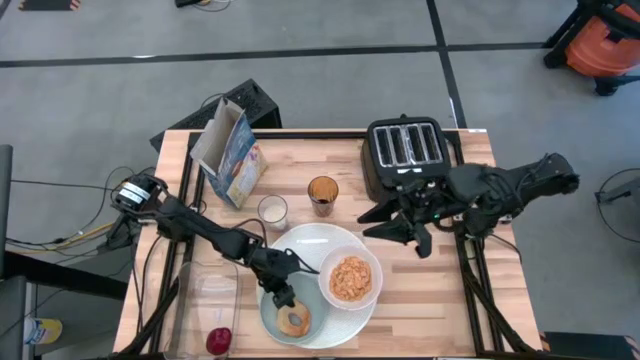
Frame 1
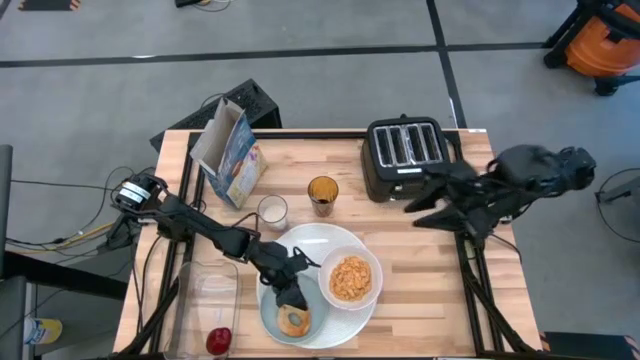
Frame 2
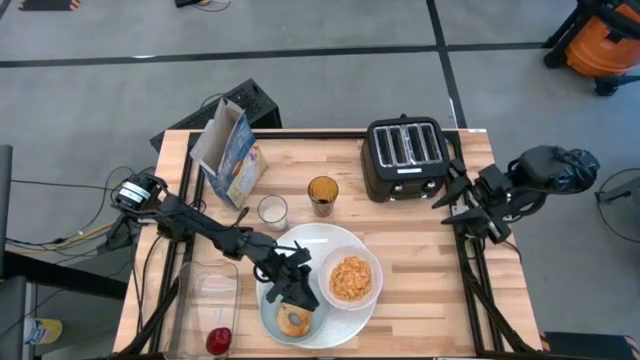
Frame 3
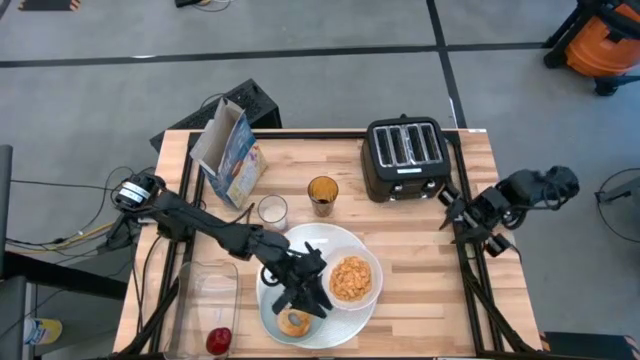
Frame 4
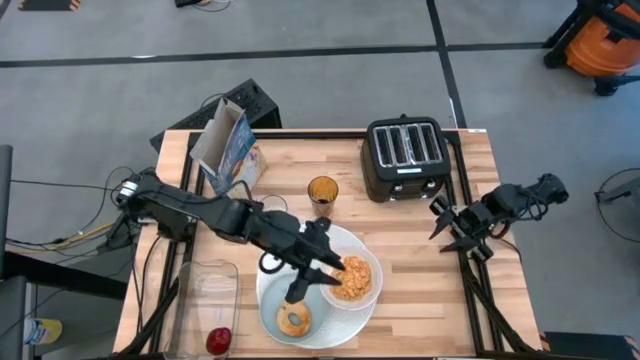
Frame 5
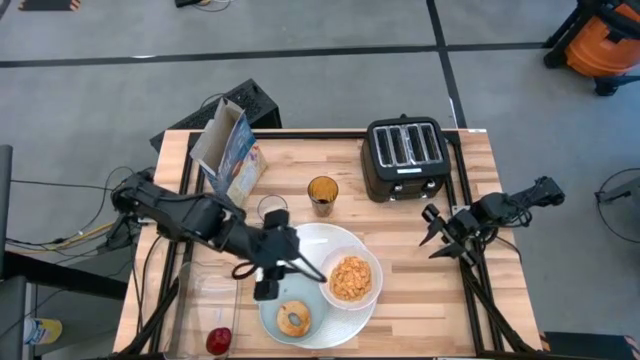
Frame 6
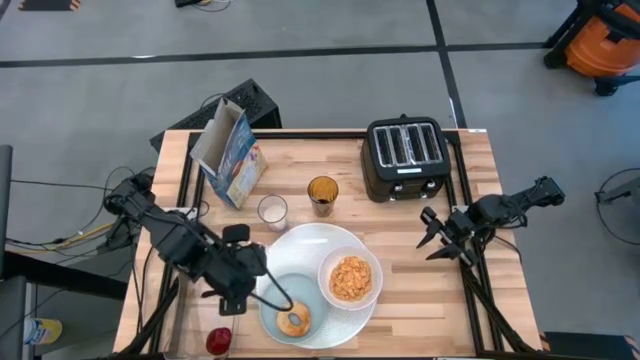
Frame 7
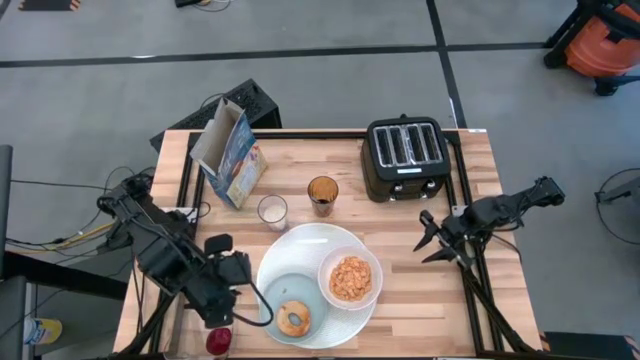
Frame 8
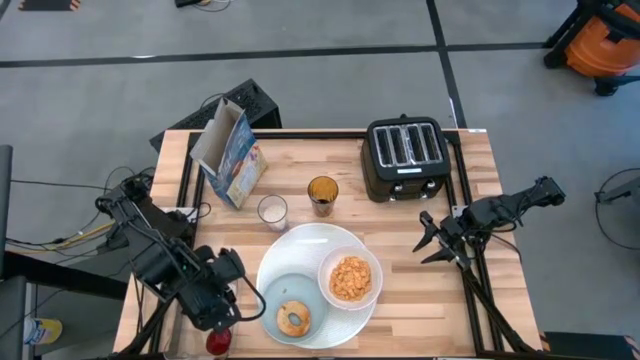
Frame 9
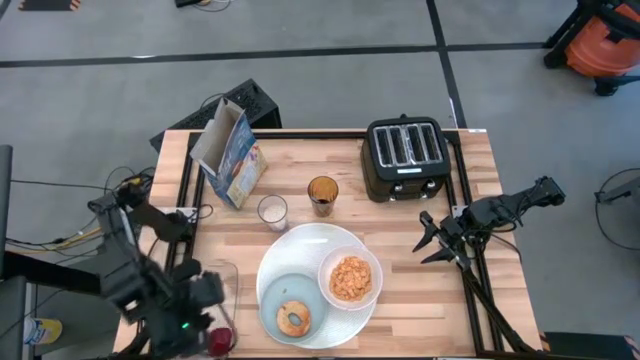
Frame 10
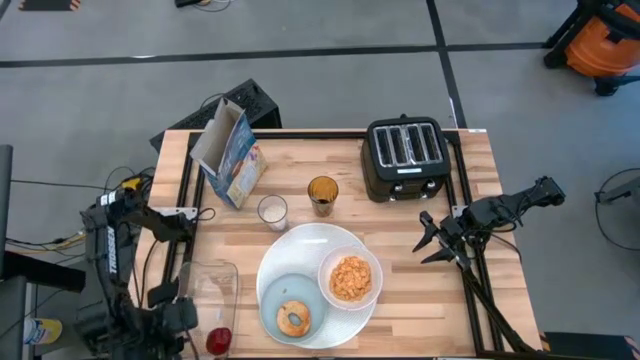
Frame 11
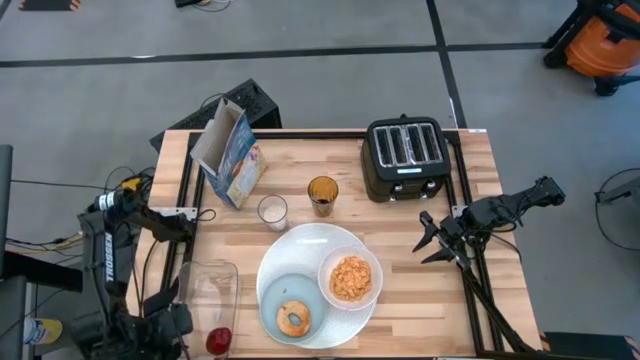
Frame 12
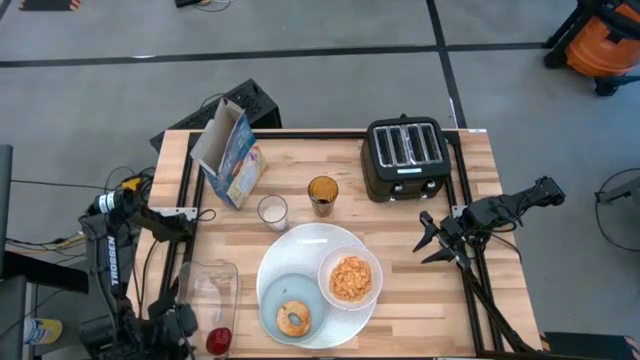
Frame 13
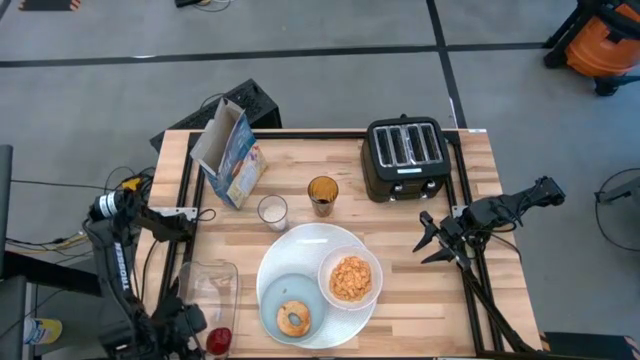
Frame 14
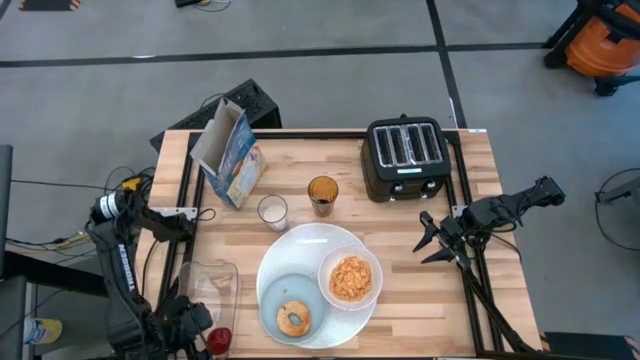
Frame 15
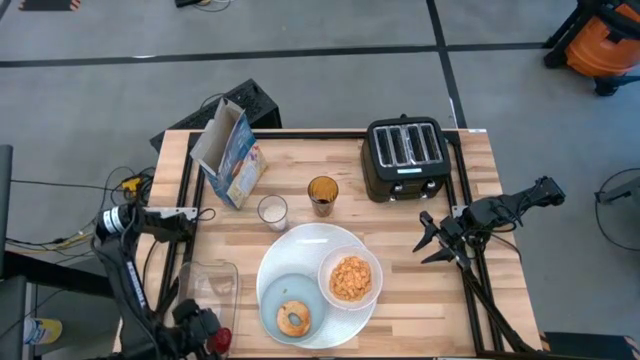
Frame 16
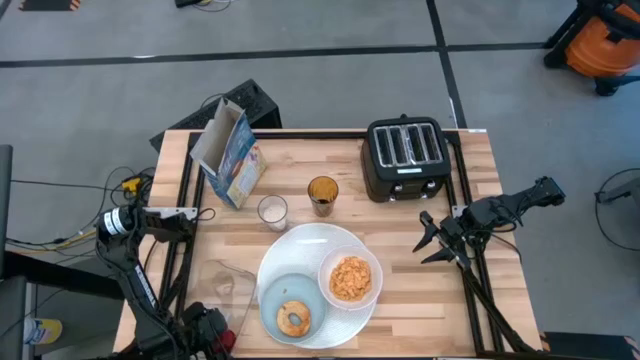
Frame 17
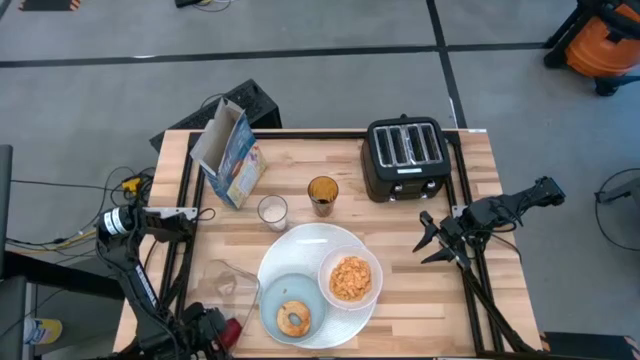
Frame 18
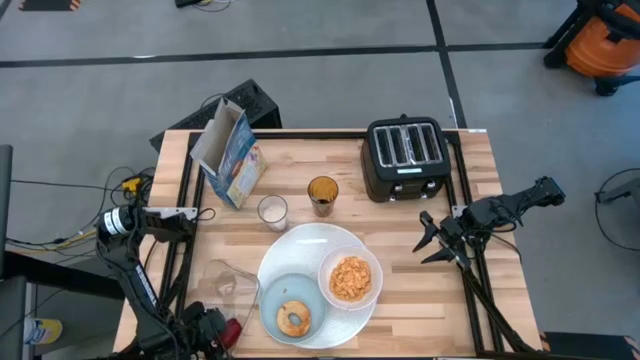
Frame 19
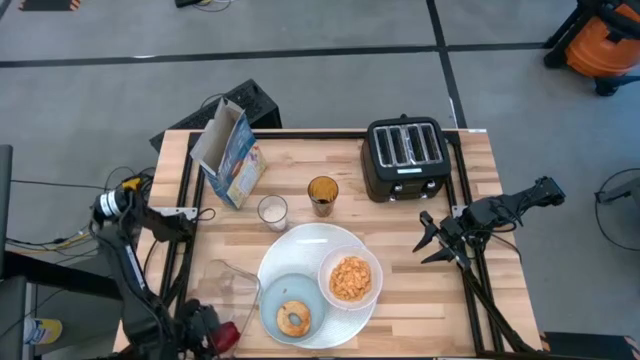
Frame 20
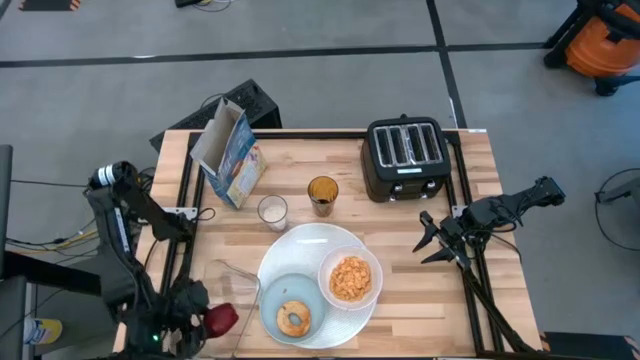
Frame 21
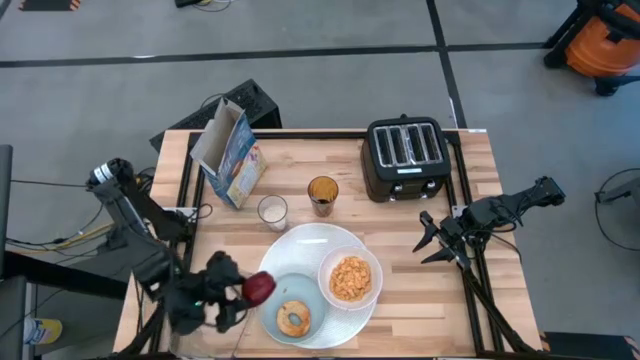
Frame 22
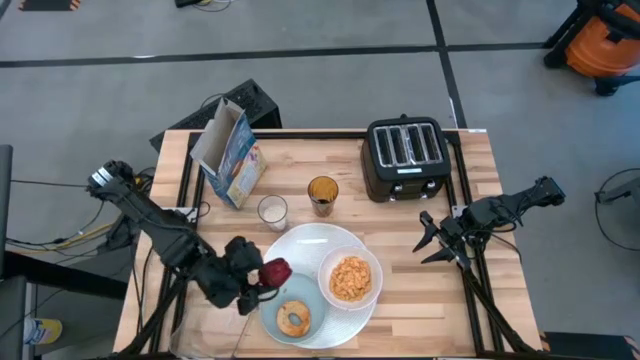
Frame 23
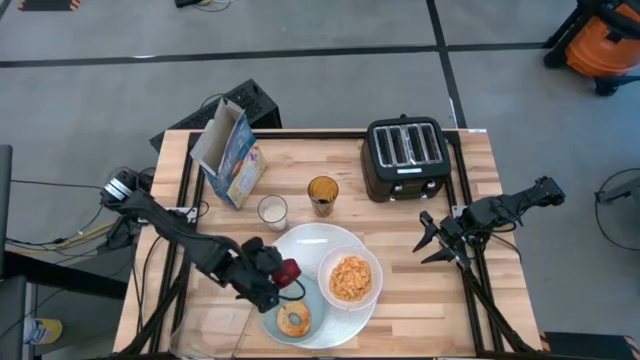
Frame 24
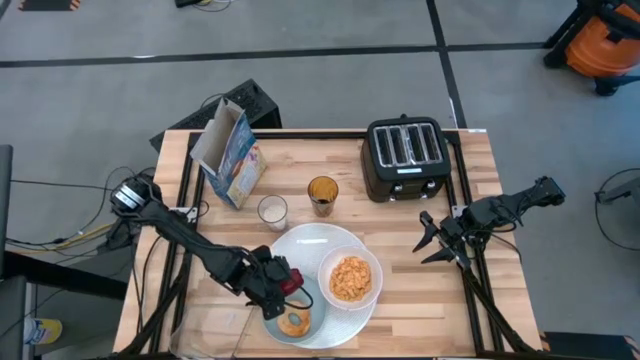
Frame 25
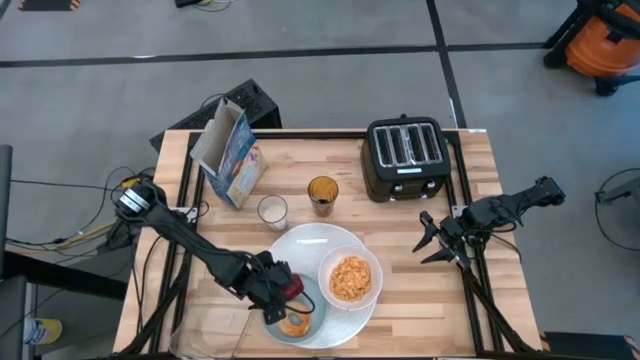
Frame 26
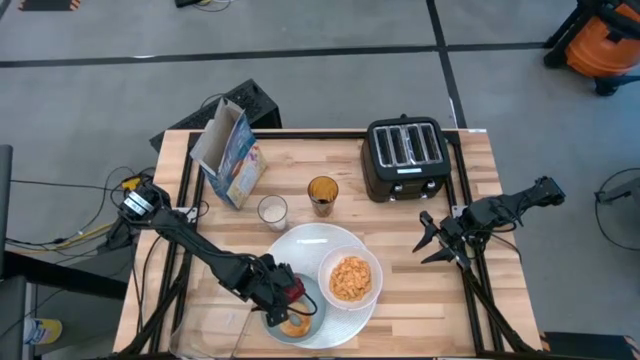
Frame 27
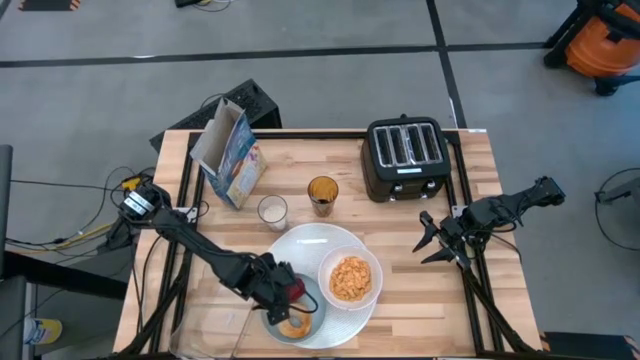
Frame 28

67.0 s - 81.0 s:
Task: Arrange a breakfast setting
Put the red apple on the blue plate

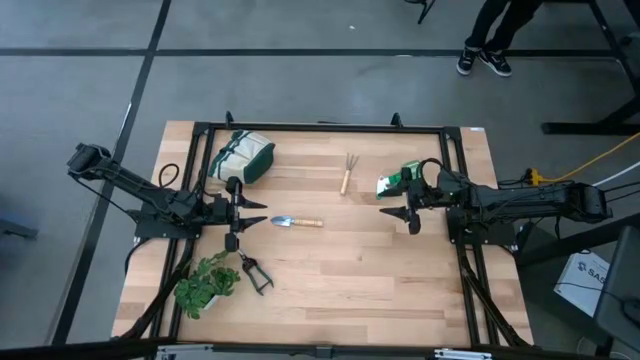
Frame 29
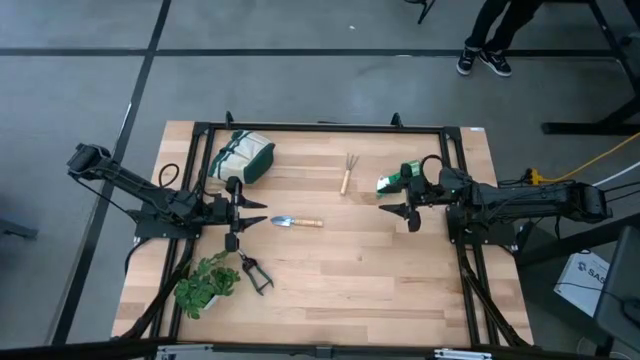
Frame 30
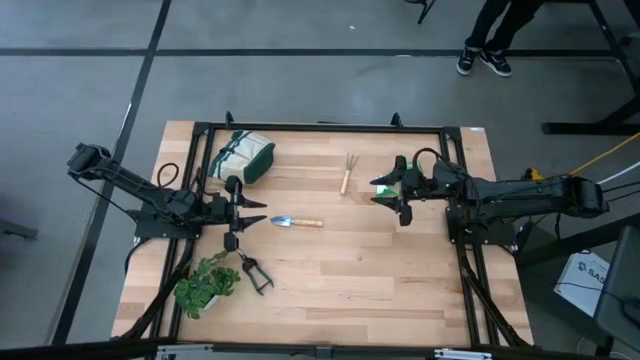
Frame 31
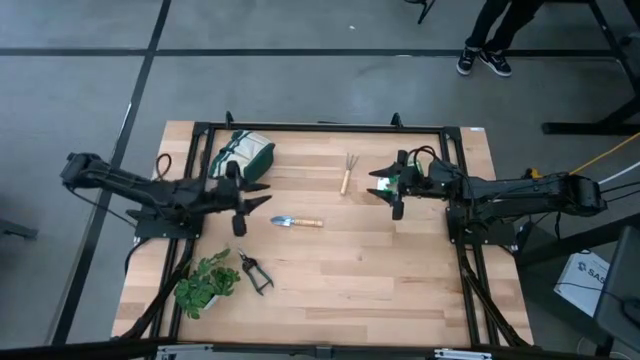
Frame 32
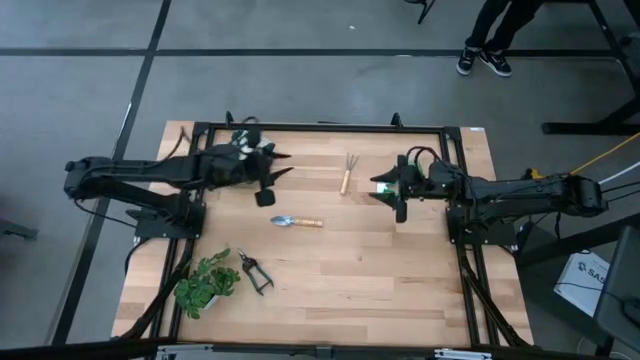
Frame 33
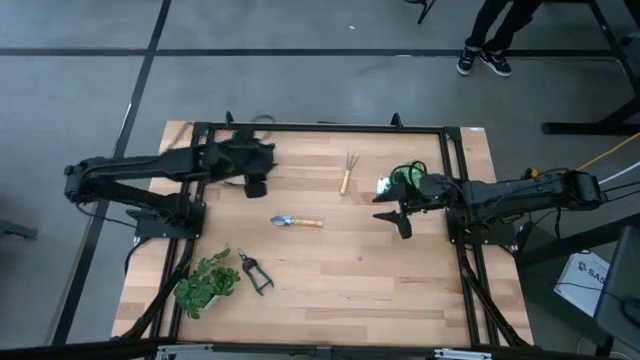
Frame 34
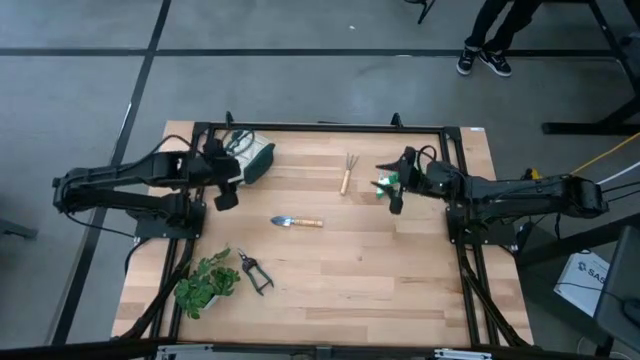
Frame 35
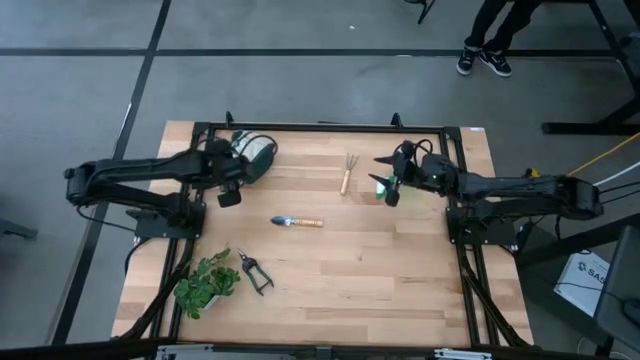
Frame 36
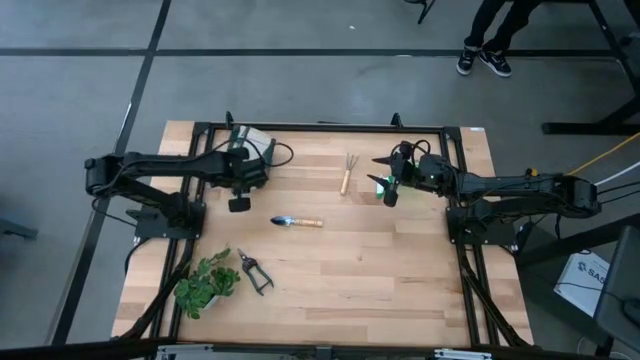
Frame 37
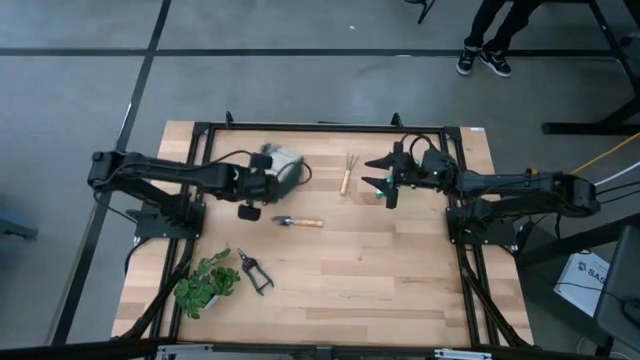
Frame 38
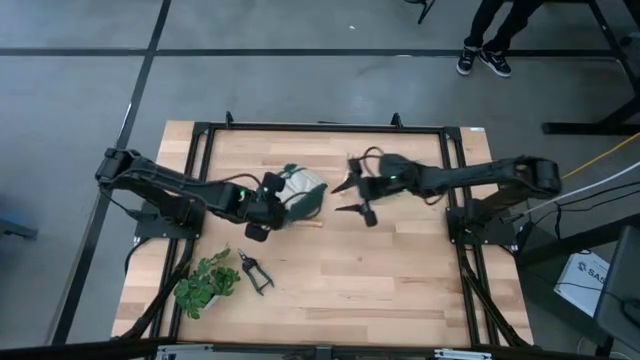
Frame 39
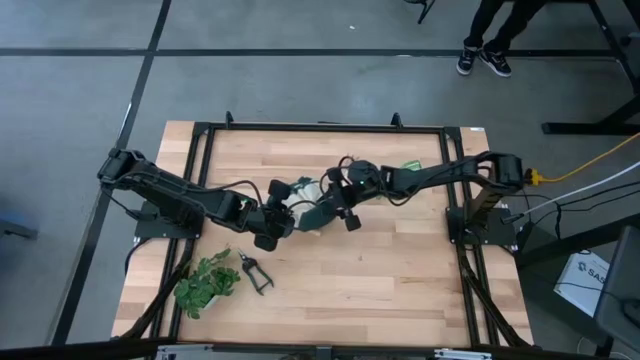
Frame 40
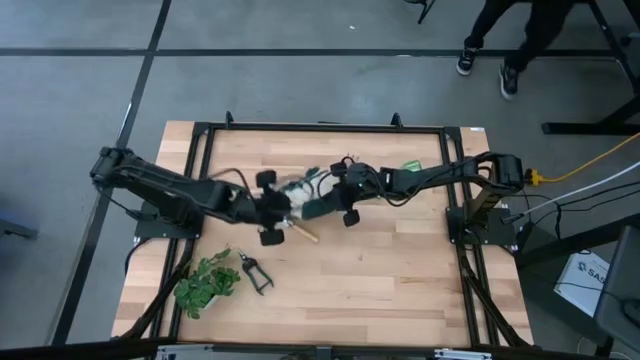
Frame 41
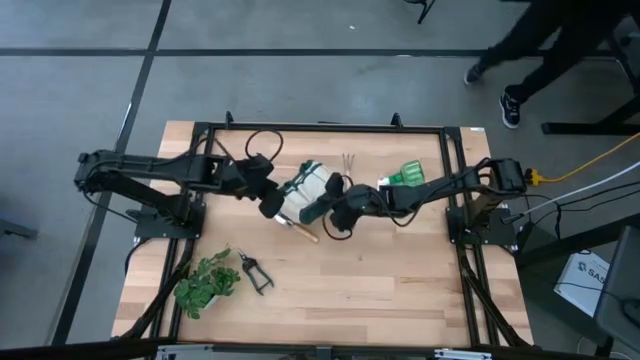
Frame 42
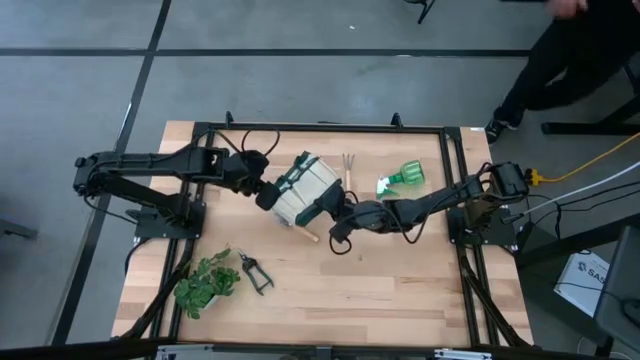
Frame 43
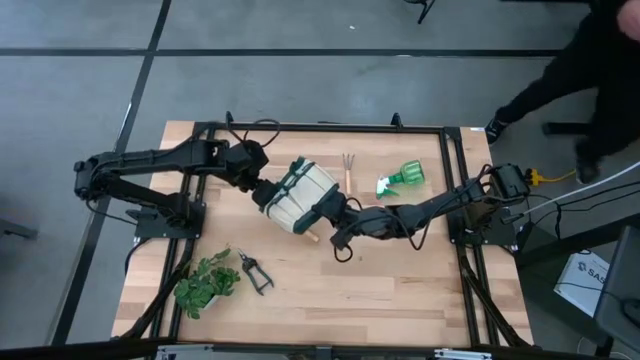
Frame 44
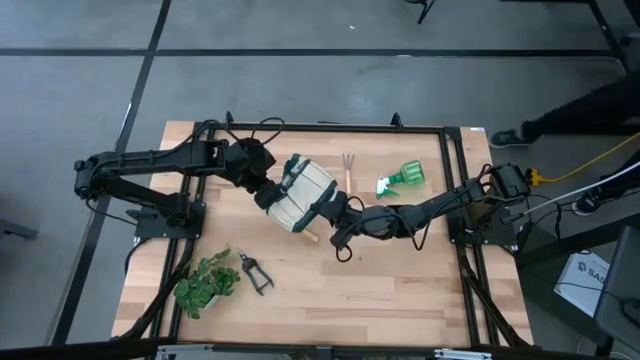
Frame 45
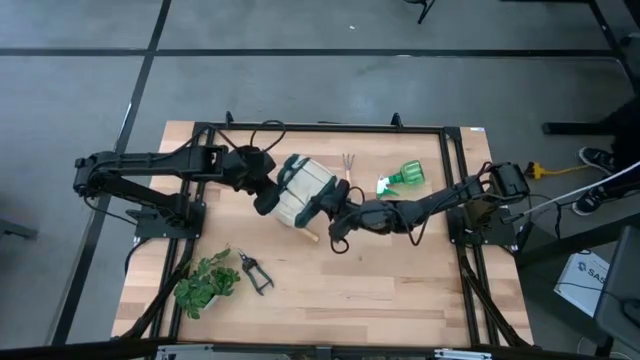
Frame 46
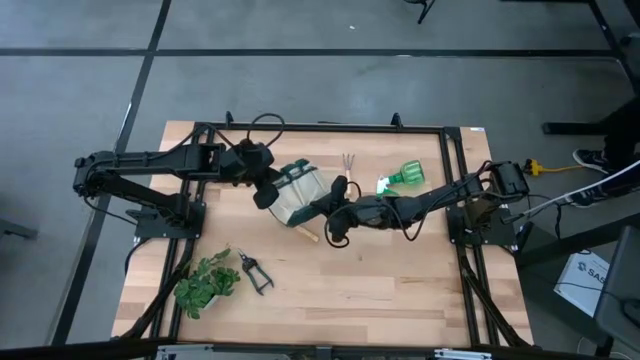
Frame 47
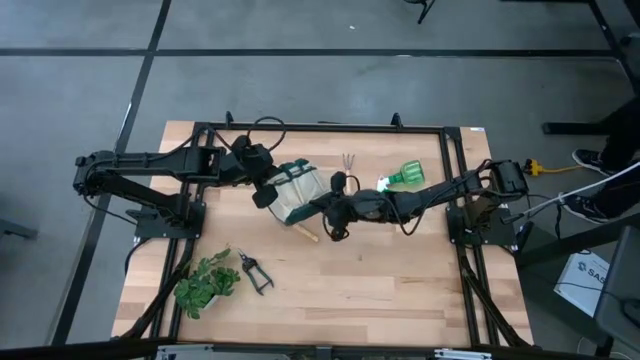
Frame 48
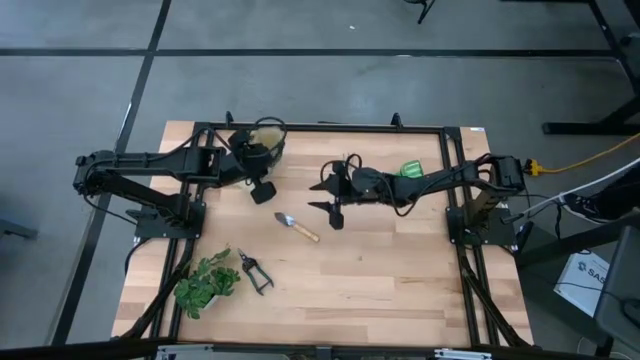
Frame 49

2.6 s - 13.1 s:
Task: Pick & Place Garden tools in Gardening bag
Prepare the gardening bag
